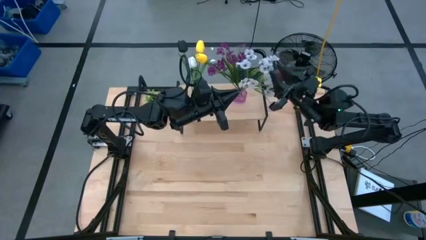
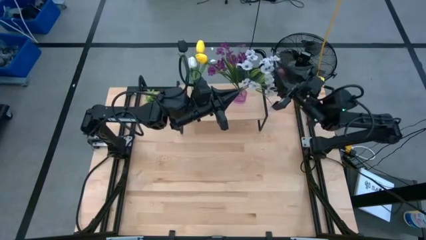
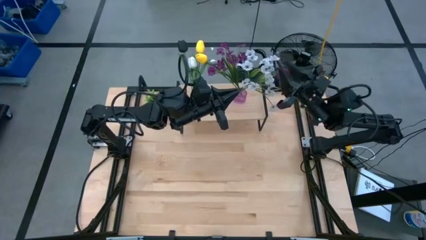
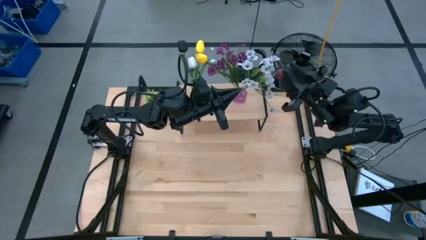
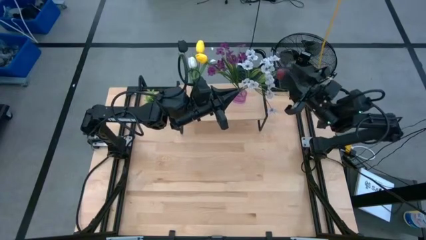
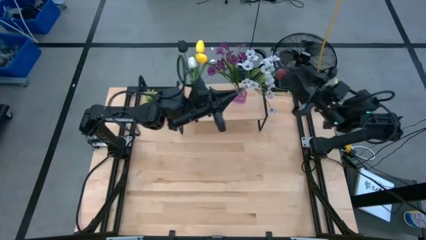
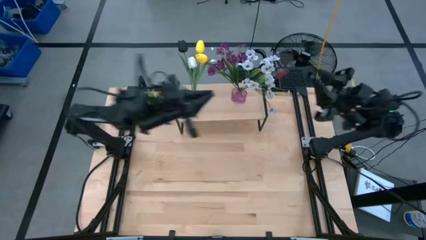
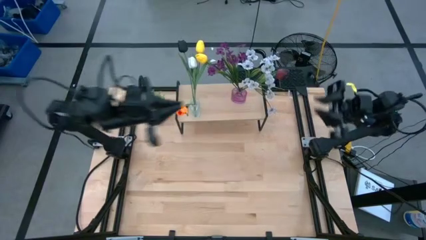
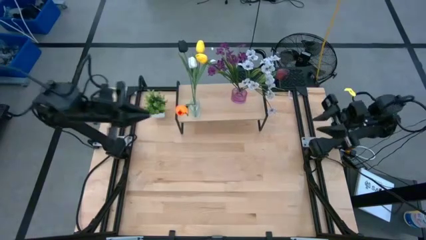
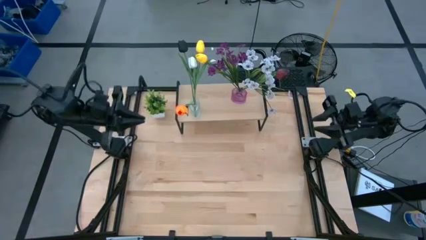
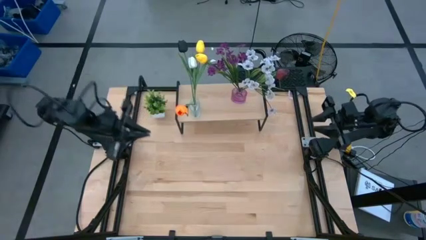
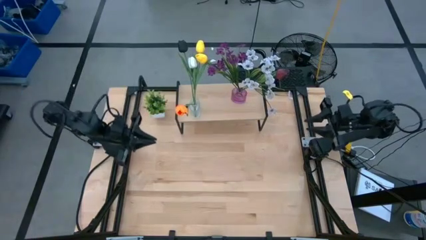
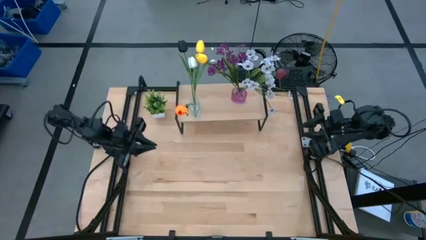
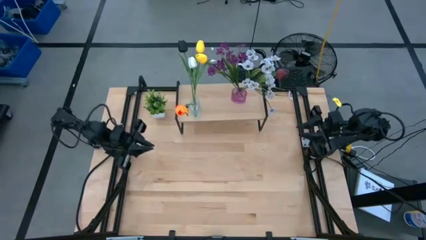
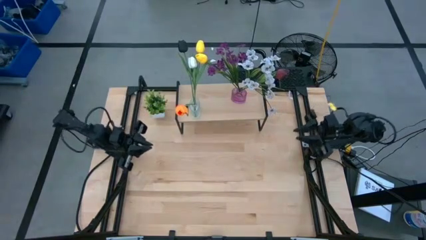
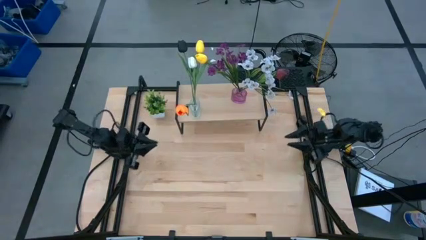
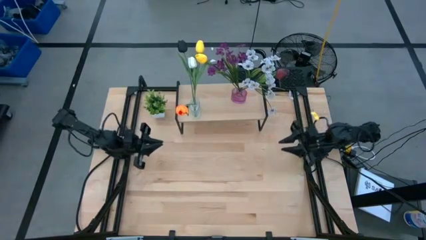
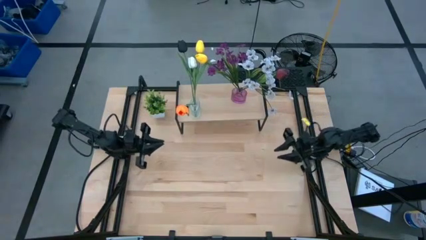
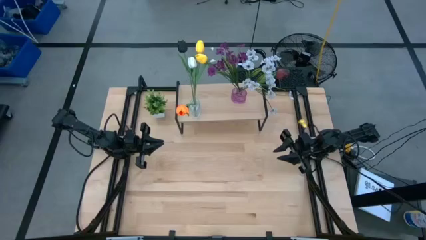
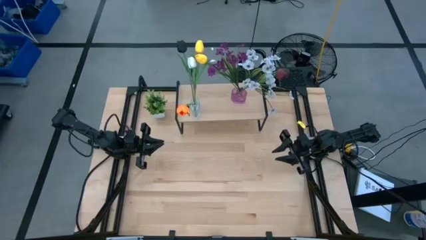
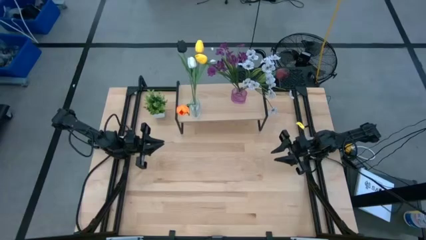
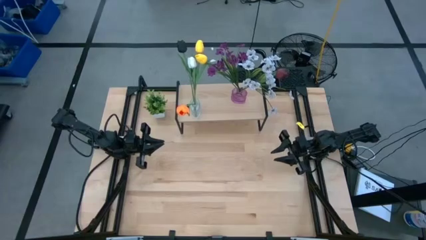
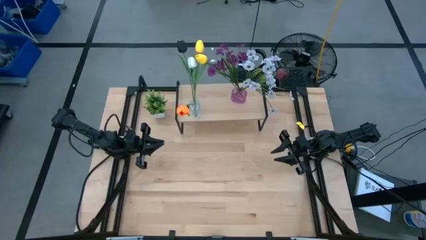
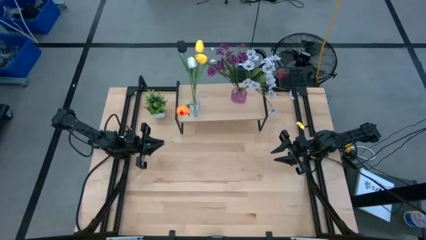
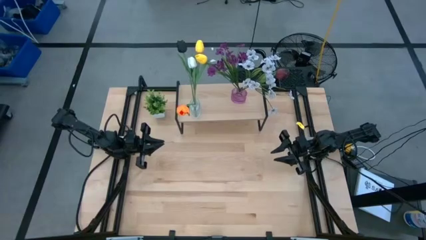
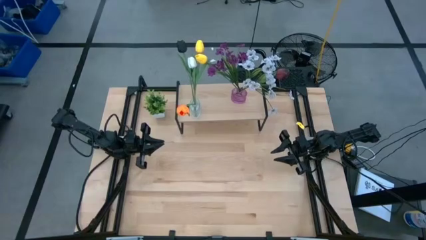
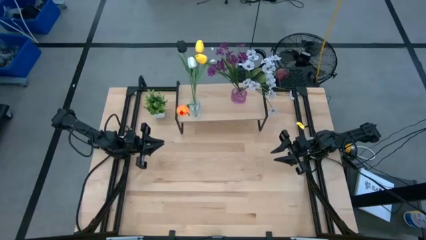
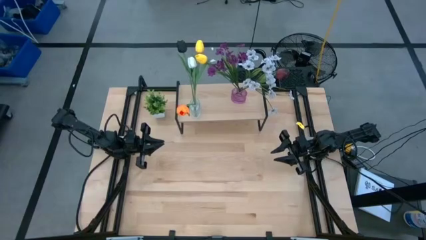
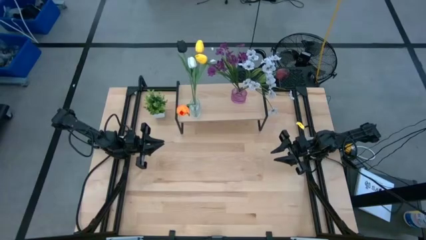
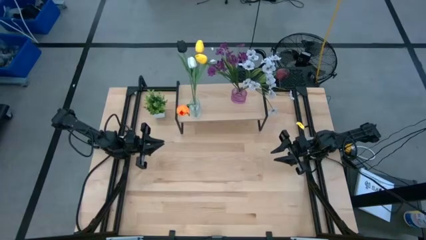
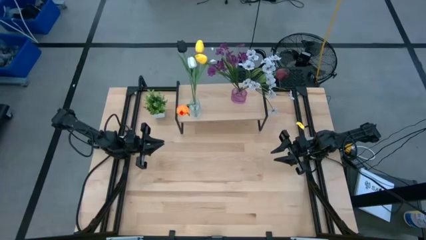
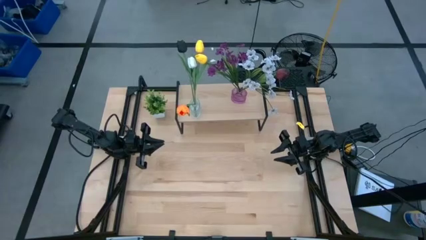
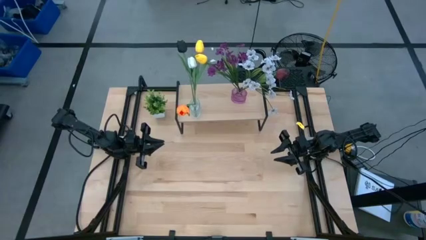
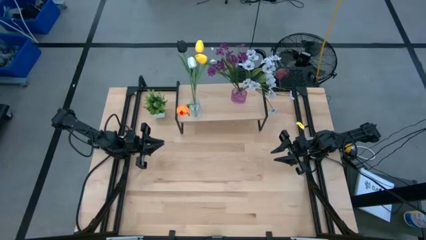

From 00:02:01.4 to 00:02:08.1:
Task: Pick and place flowers into a vace then onto a shelf
Return to Home Position

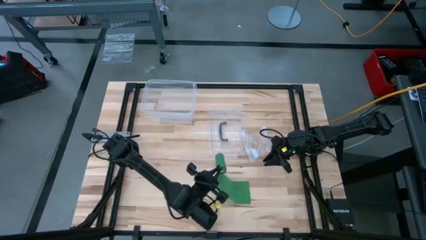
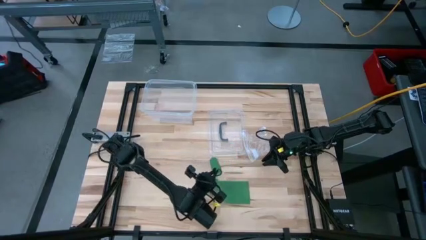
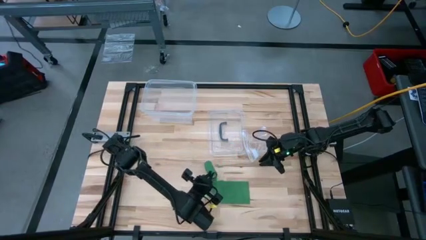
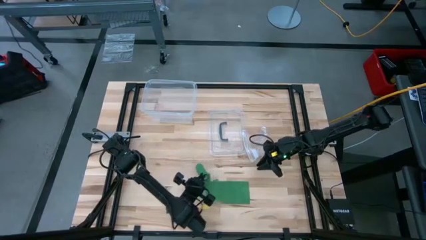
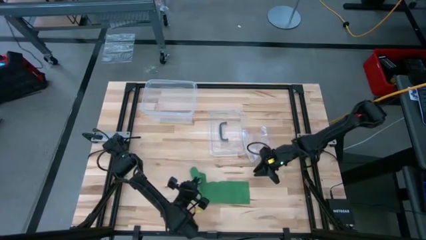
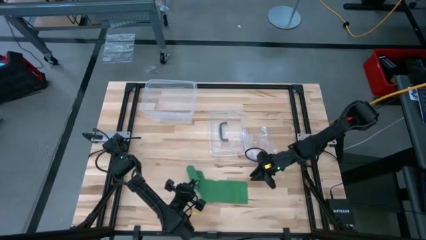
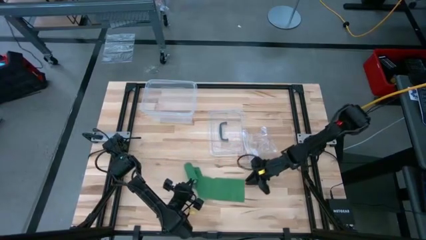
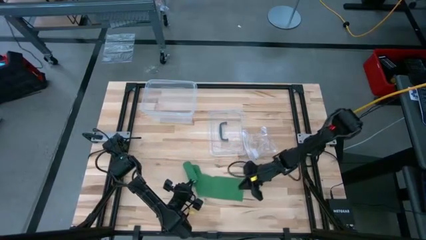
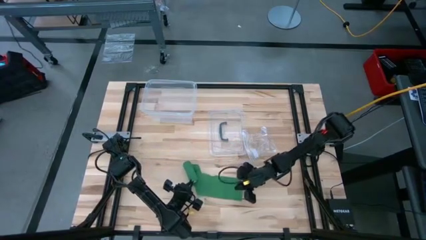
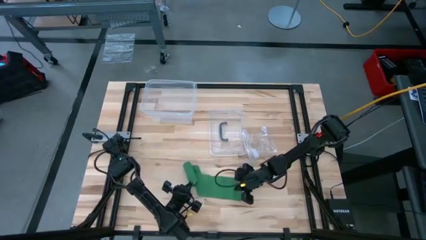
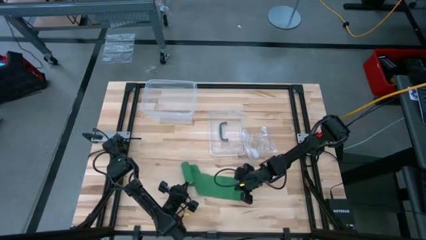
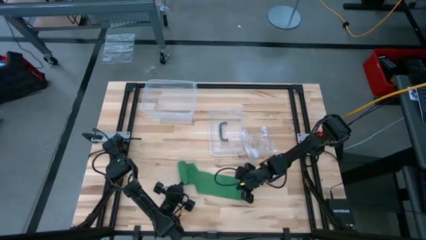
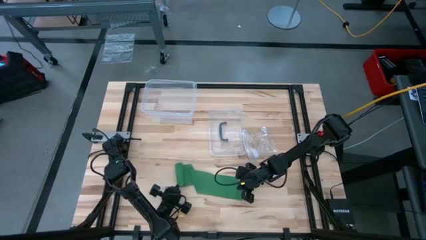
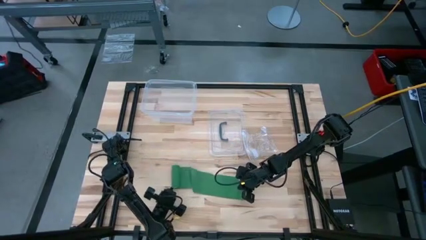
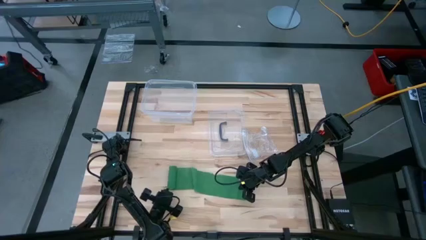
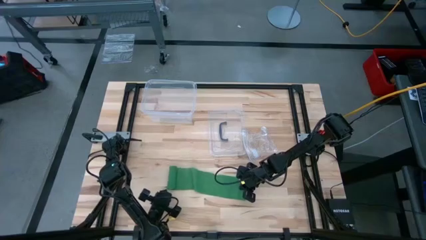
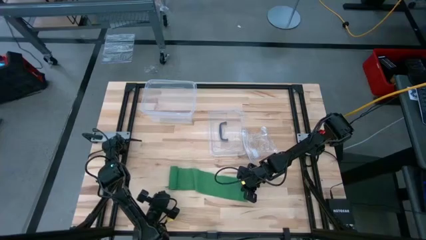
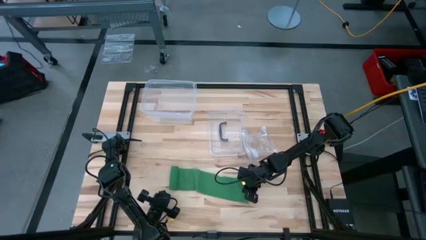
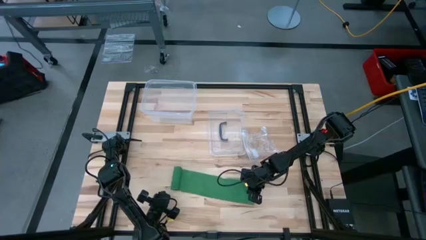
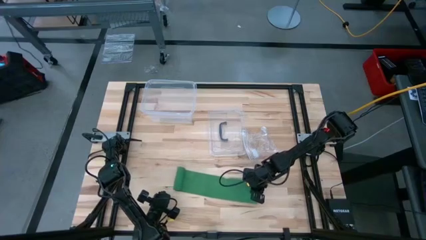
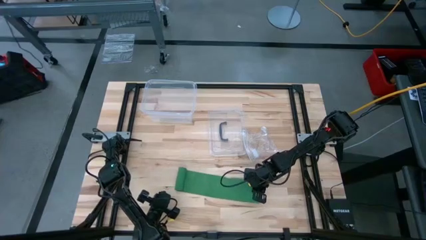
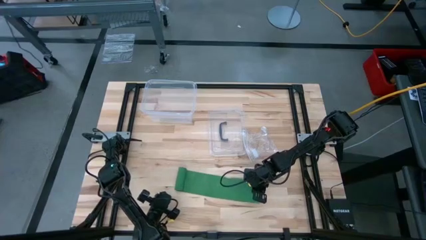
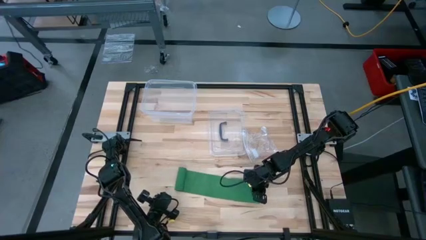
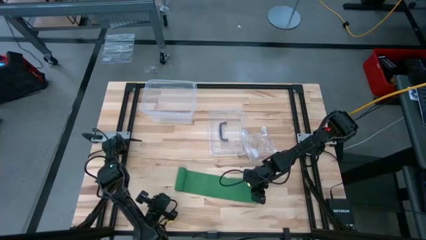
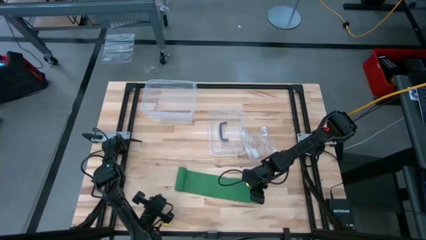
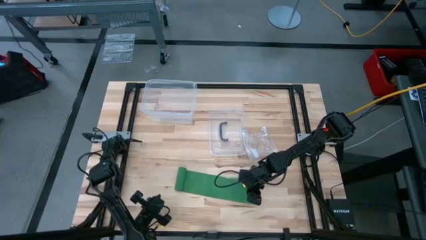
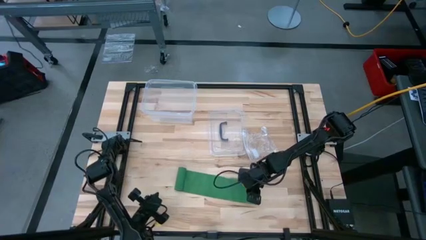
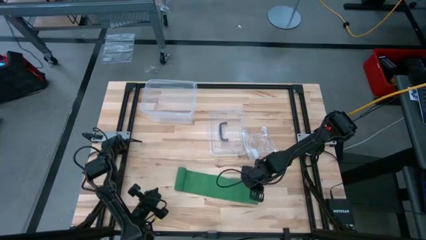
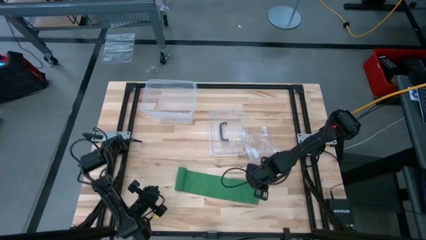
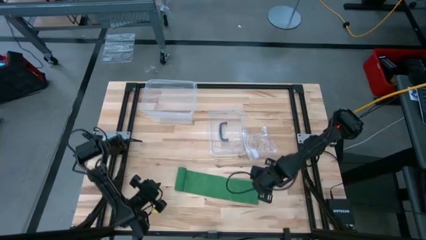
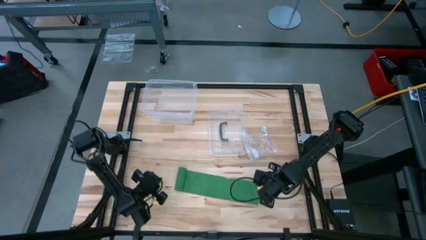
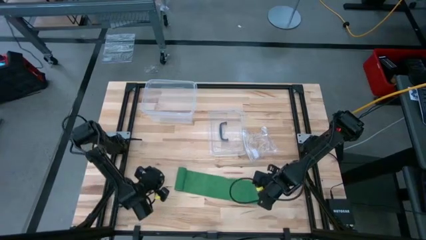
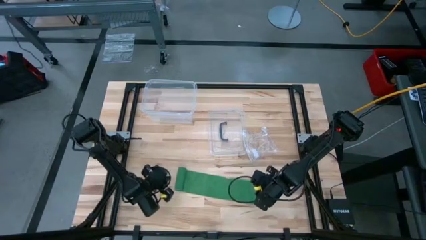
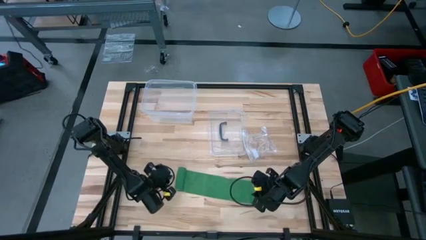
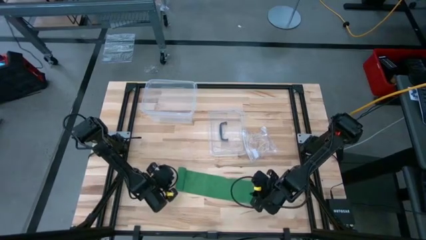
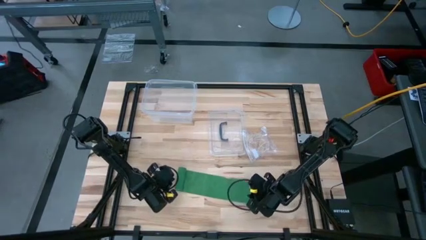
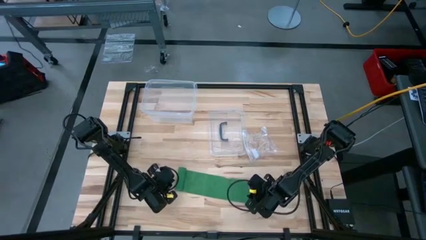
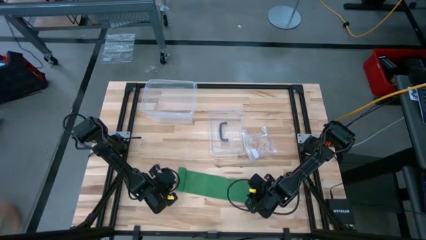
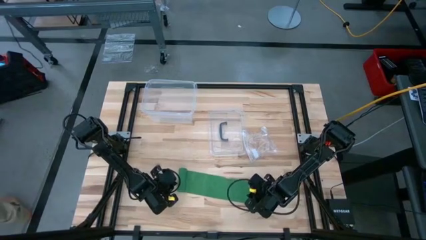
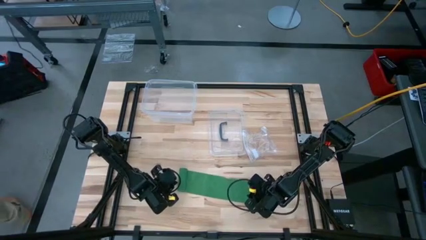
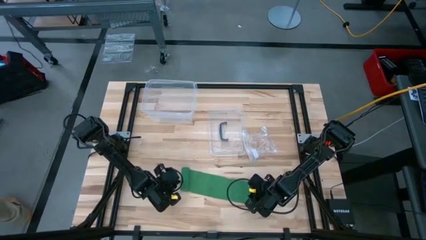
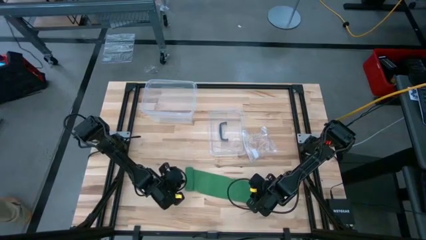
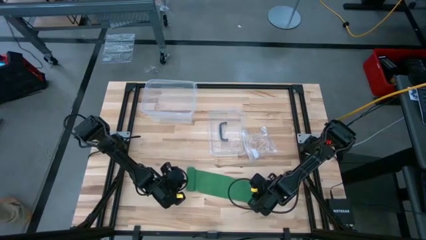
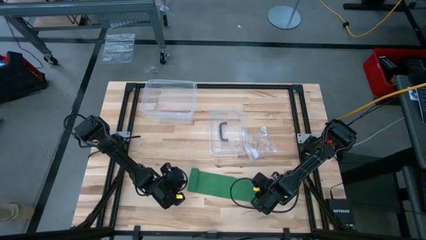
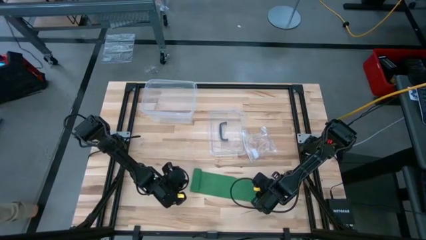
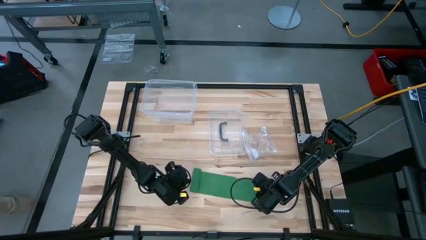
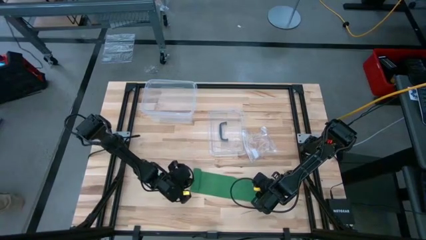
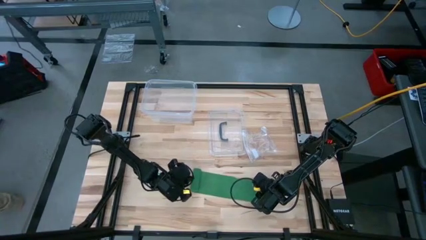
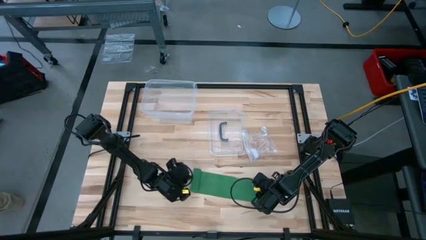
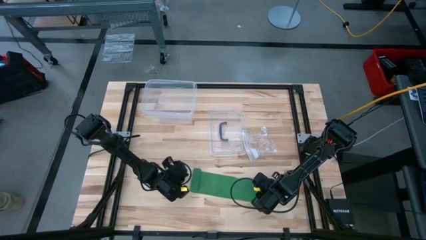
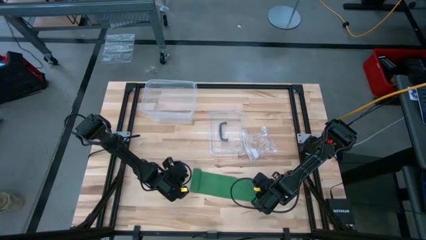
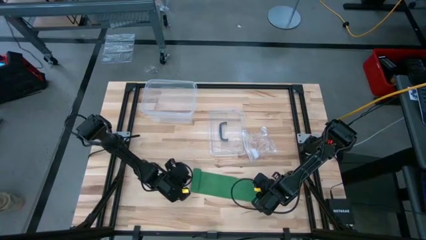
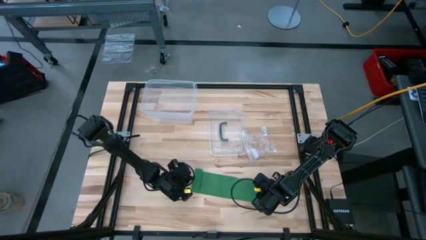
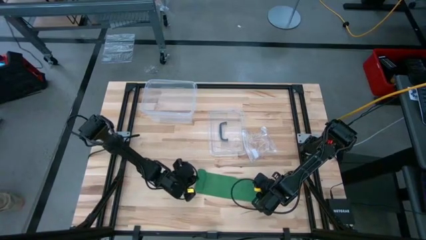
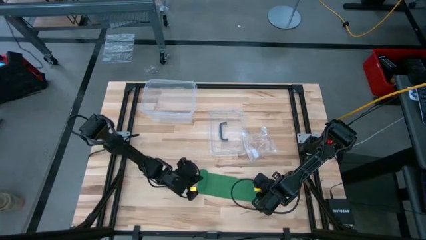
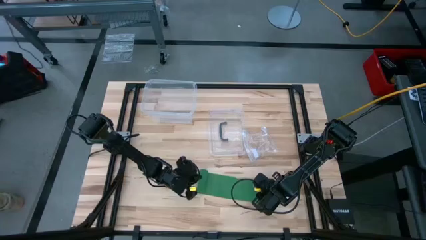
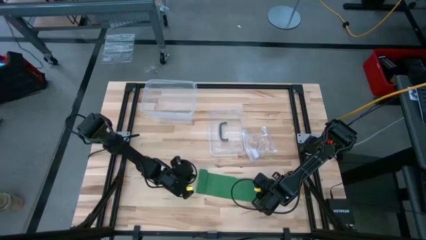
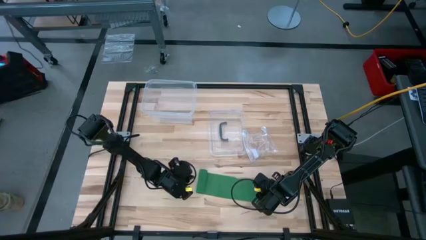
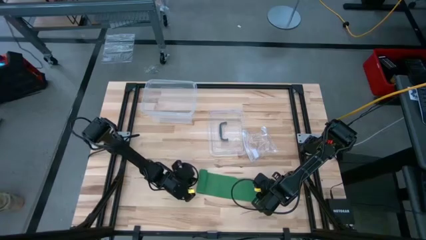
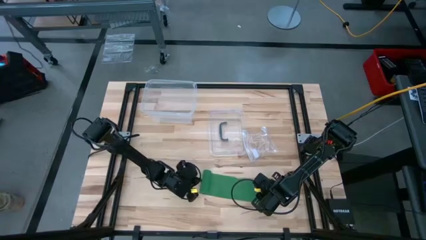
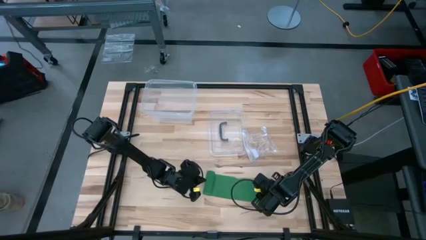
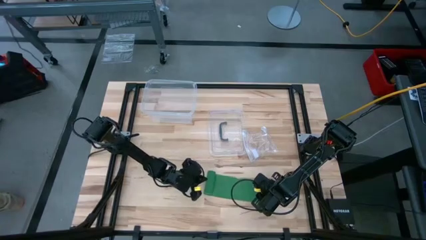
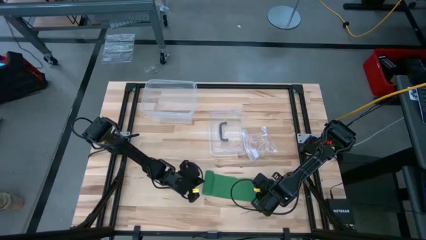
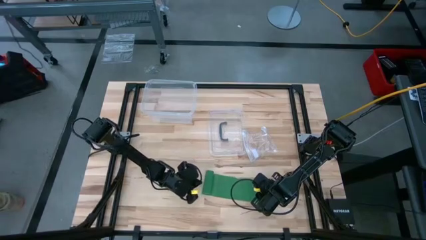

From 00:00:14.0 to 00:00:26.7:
Task: Roll bandage
Roll the green bandage
